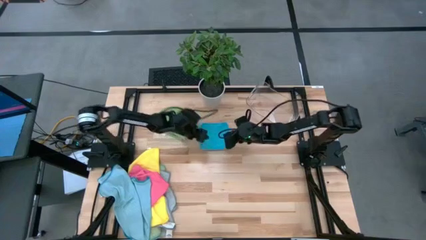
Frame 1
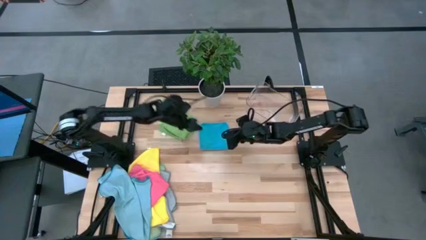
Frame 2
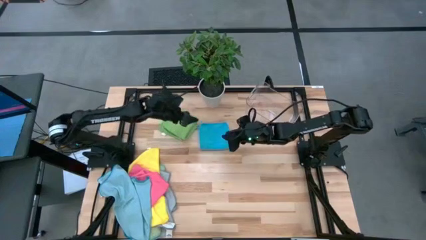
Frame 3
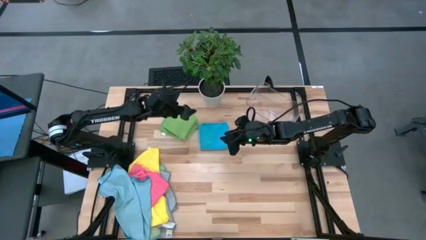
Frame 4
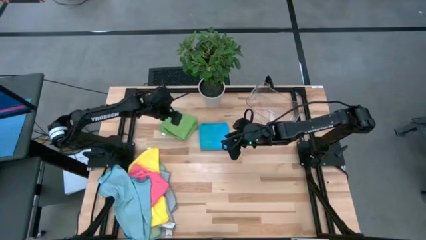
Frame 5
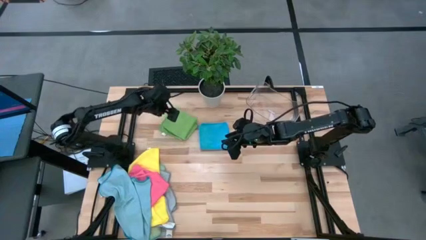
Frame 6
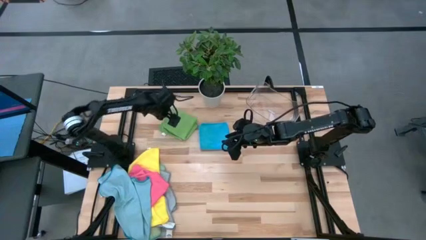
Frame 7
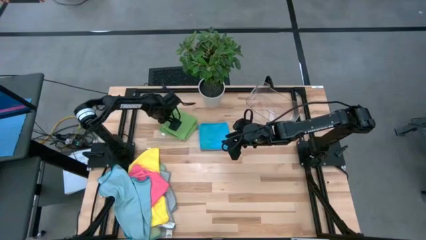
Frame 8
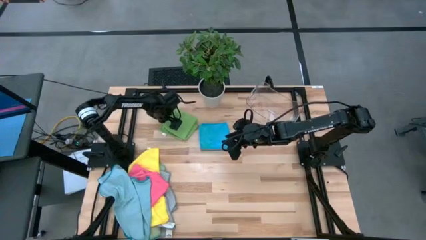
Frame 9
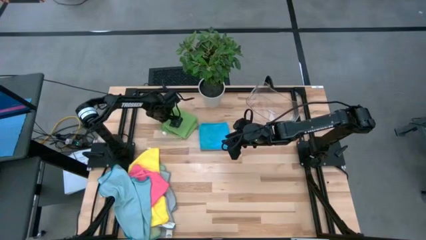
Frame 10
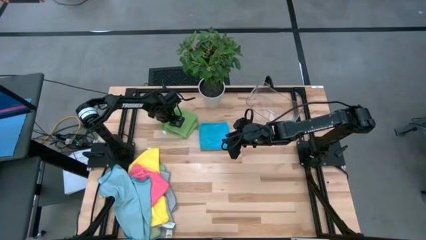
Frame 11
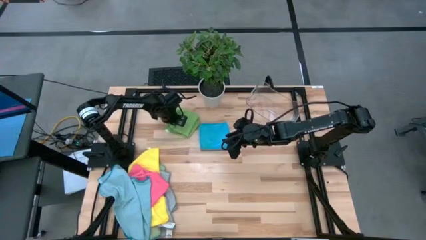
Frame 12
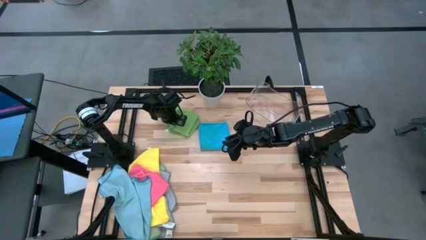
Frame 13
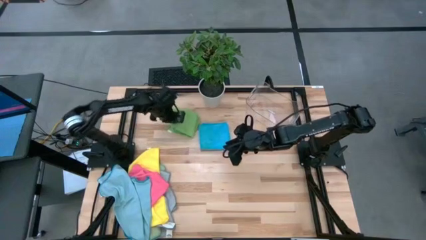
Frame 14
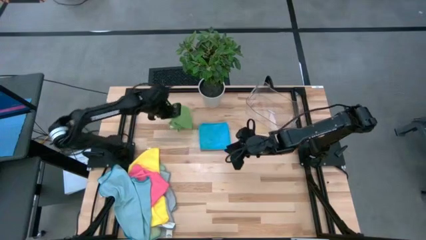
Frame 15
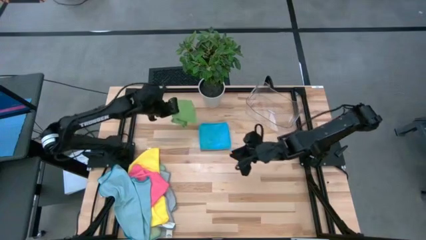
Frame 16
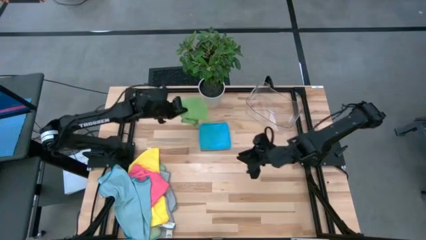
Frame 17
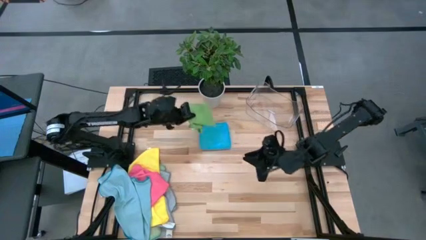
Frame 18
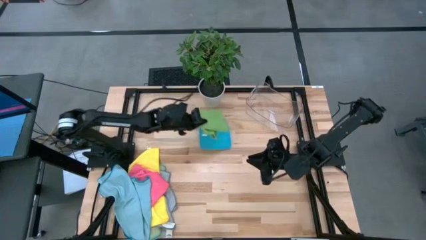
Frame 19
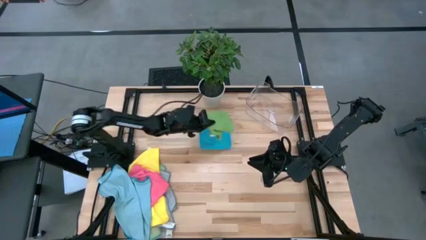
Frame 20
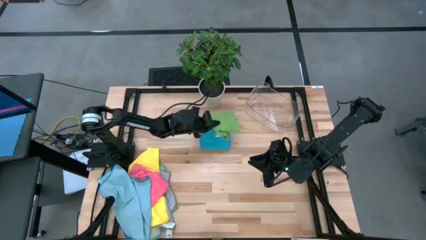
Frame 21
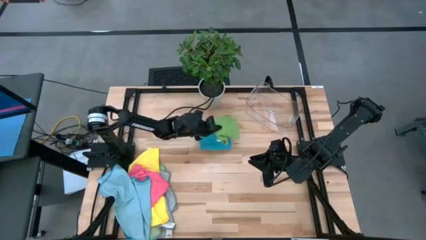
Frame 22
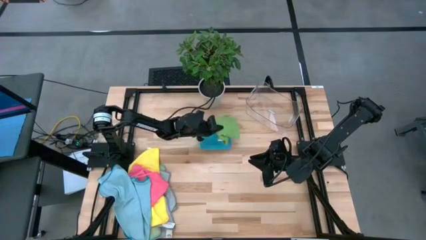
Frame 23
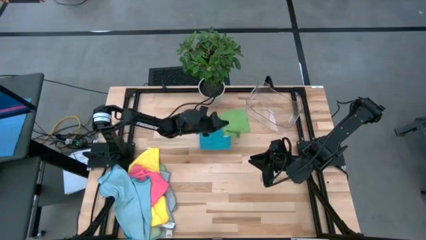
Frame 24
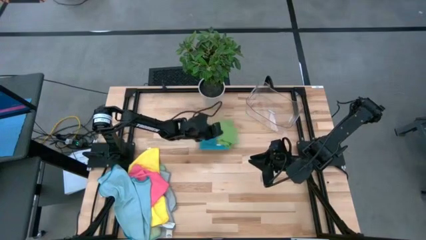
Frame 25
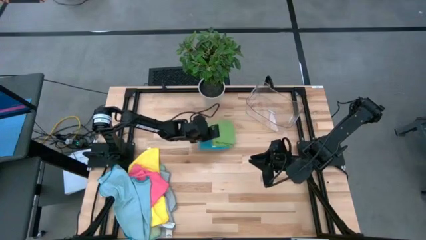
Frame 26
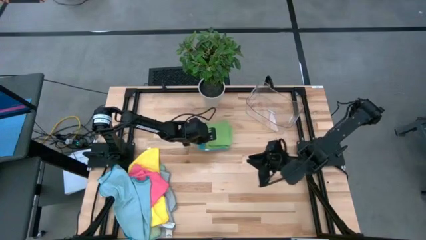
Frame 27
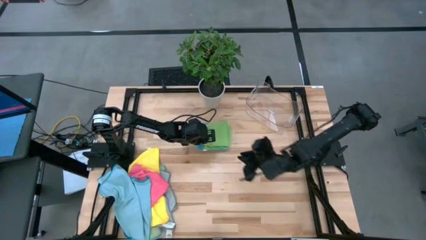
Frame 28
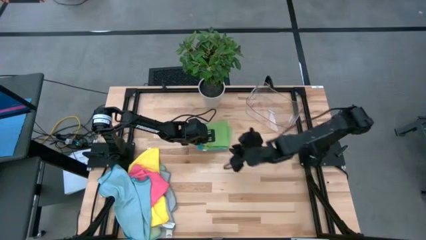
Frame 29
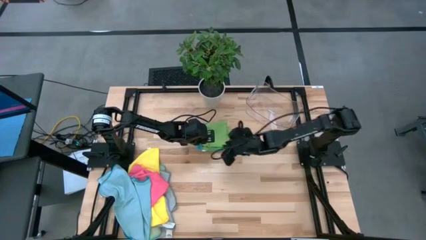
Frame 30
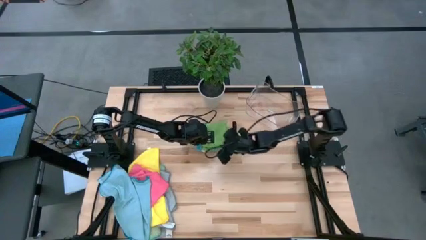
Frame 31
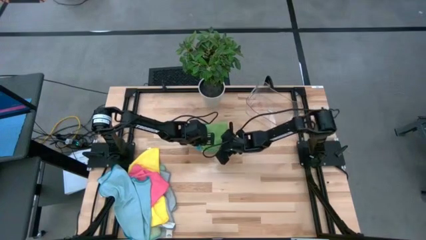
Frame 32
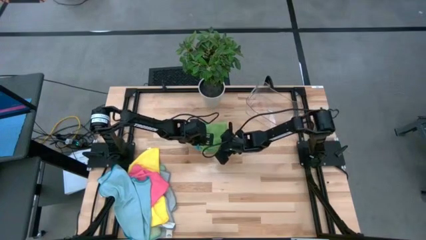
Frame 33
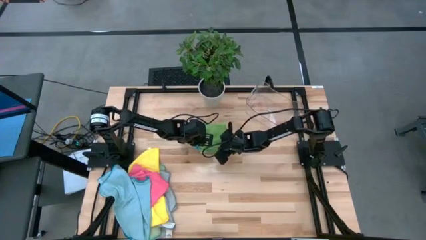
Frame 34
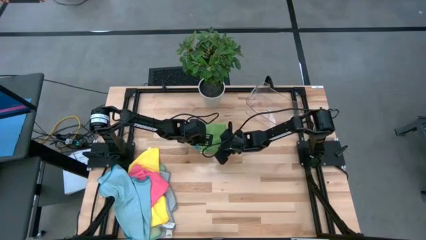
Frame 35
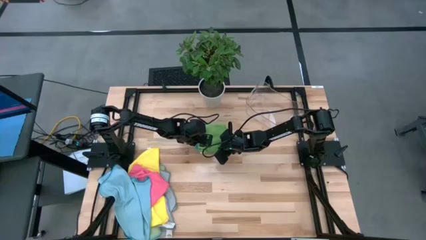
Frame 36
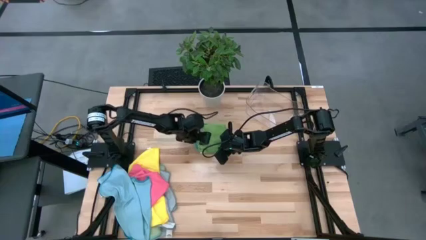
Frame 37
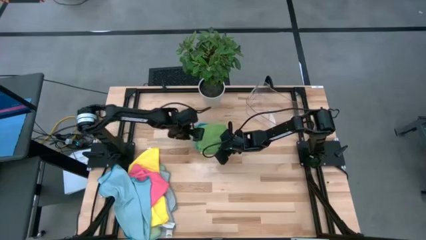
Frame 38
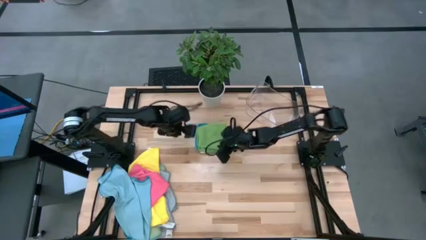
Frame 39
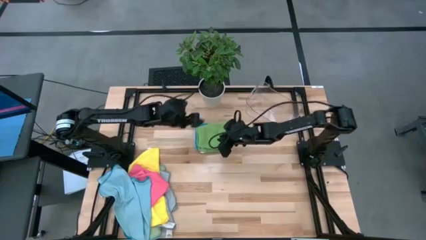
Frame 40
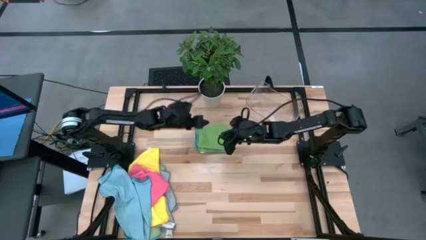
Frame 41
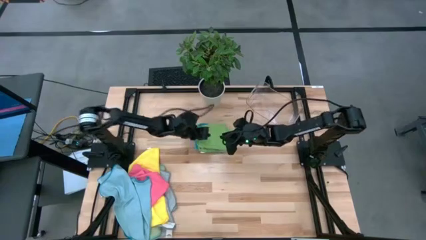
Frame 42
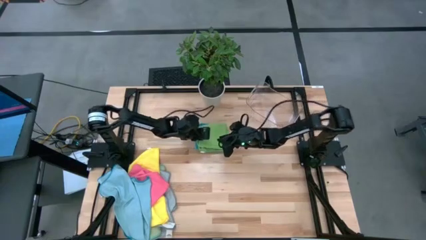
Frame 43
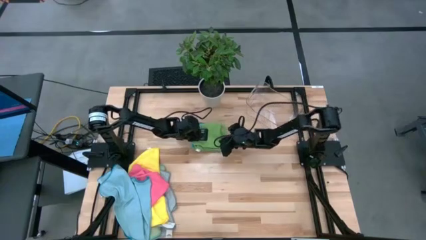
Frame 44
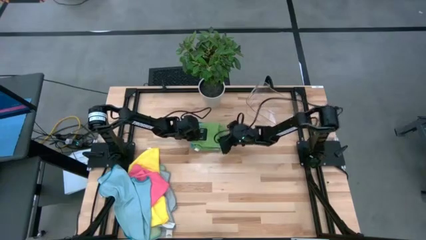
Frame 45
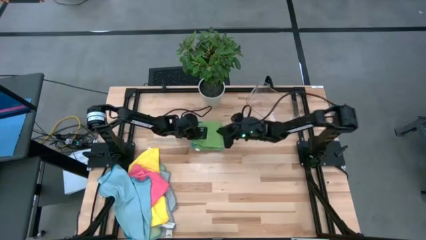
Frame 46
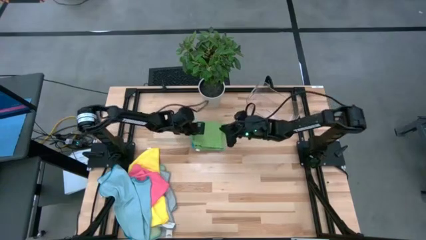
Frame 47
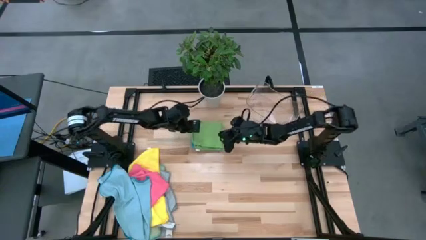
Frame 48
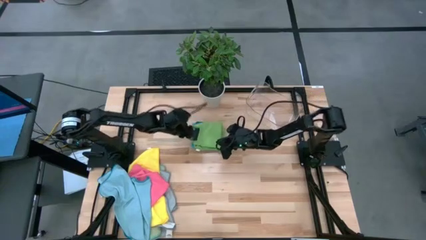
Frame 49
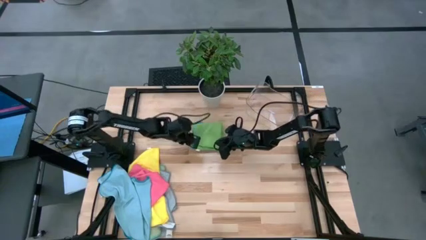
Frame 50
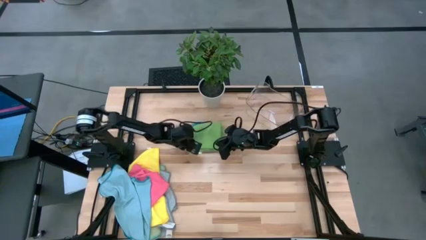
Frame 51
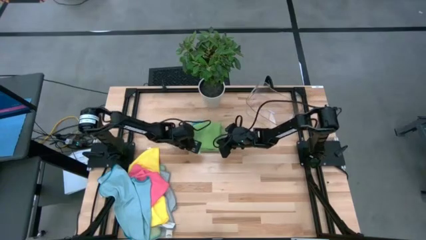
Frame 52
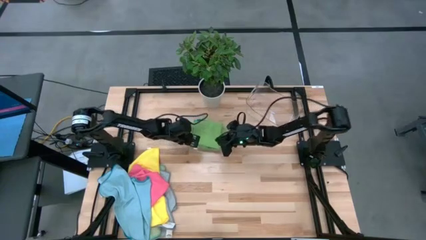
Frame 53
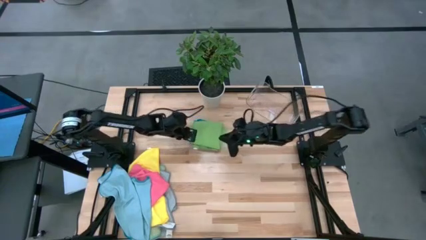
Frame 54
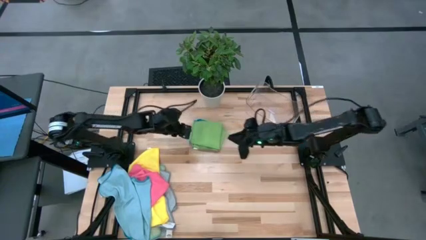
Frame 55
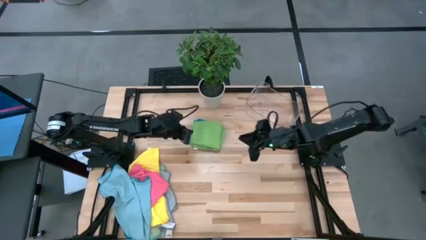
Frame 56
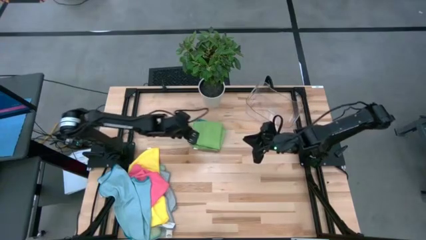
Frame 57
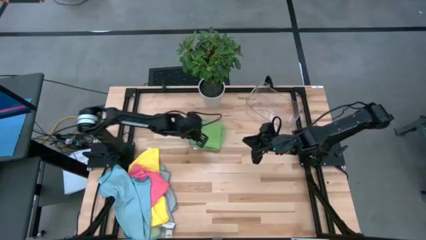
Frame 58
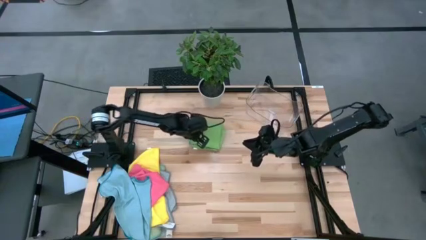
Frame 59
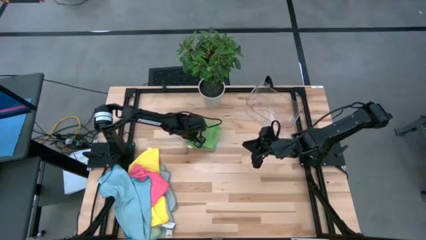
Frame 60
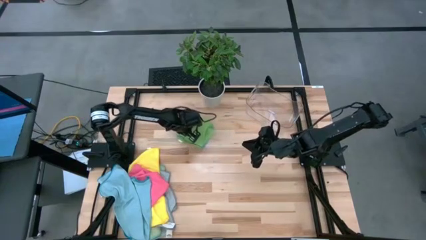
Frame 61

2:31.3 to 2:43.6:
Task: Fold microfiber towels
Stack the green microfiber towel on the blue microfiber towel

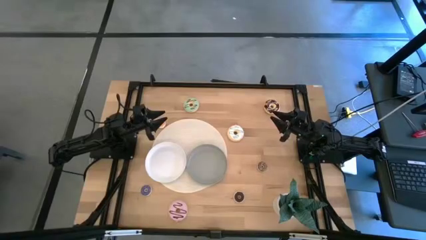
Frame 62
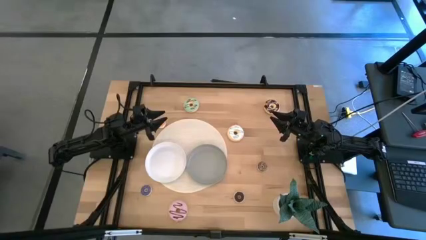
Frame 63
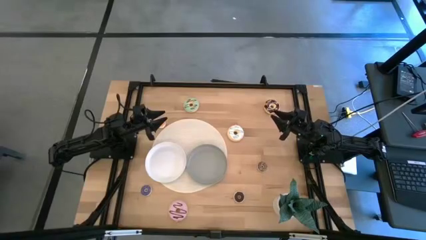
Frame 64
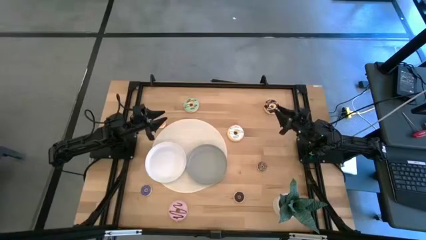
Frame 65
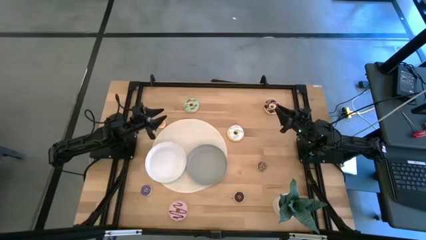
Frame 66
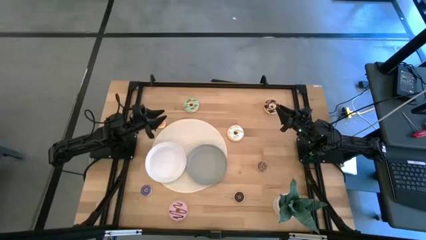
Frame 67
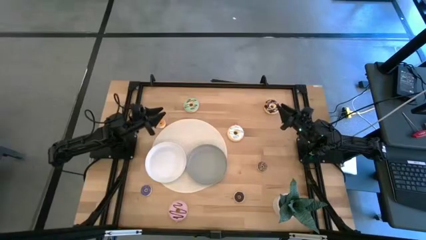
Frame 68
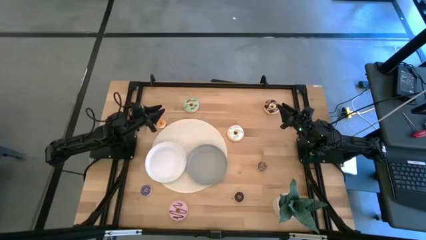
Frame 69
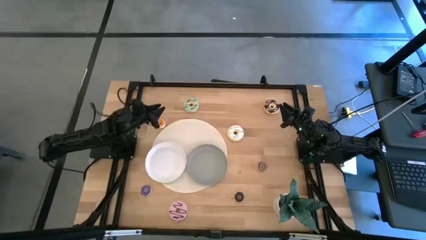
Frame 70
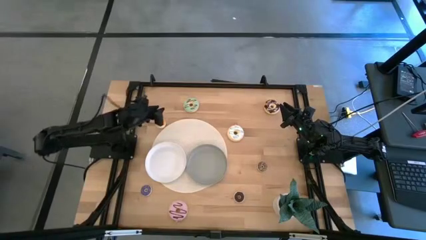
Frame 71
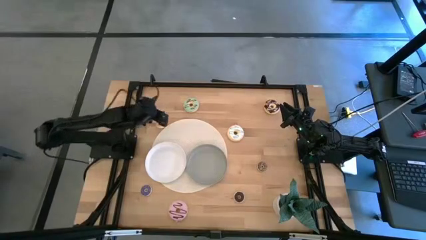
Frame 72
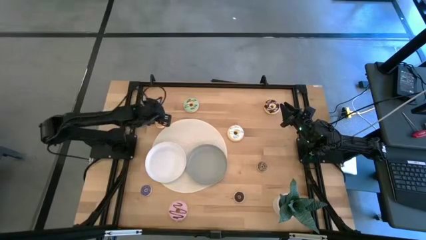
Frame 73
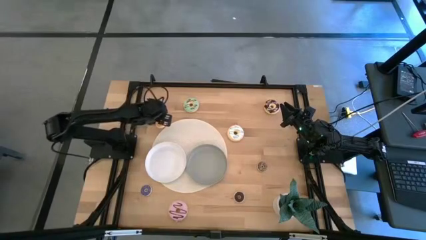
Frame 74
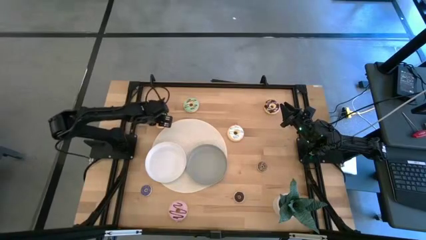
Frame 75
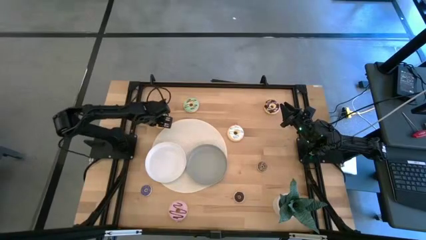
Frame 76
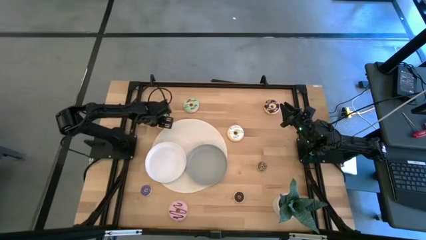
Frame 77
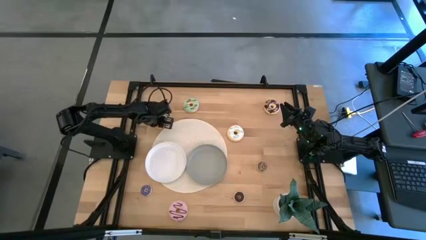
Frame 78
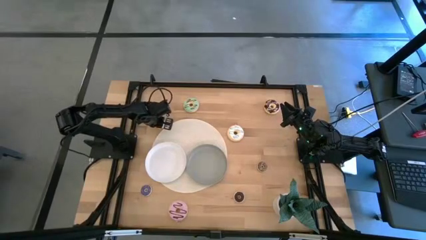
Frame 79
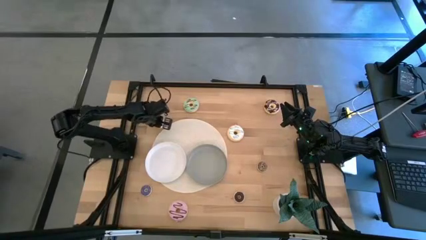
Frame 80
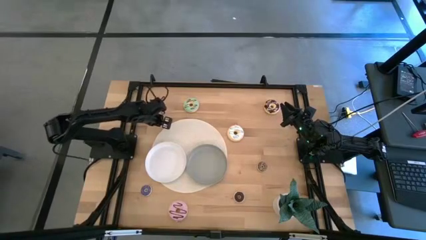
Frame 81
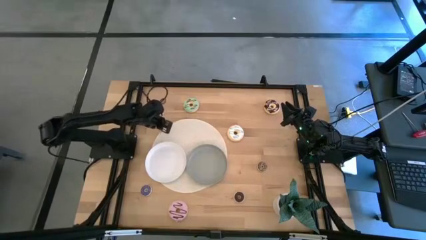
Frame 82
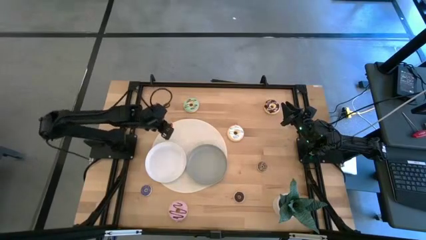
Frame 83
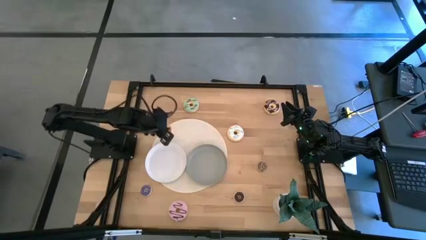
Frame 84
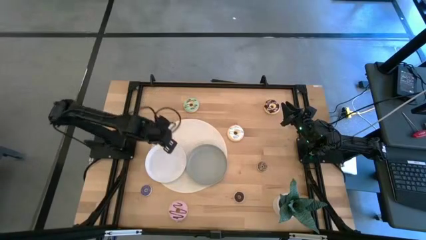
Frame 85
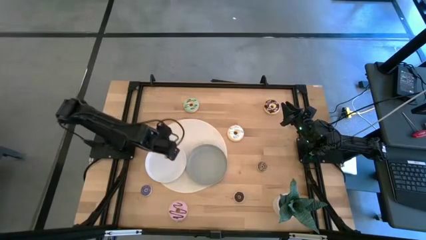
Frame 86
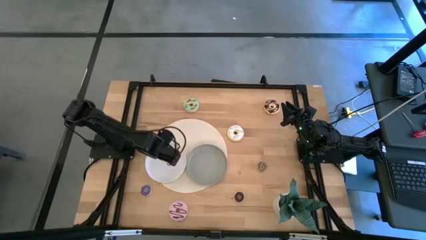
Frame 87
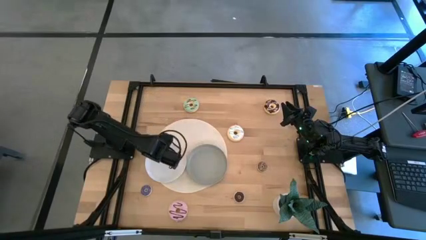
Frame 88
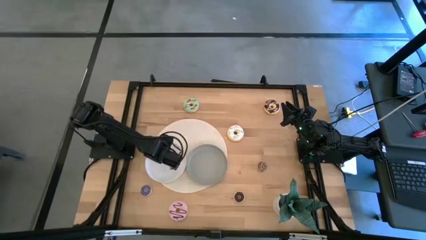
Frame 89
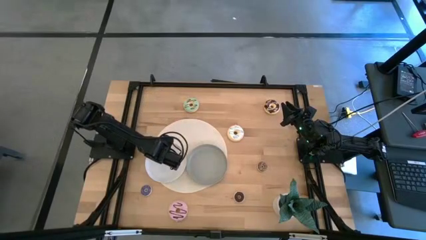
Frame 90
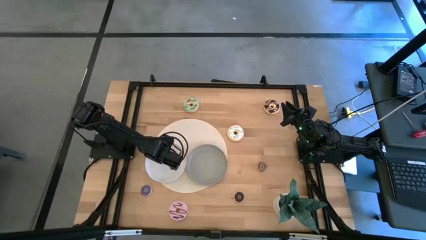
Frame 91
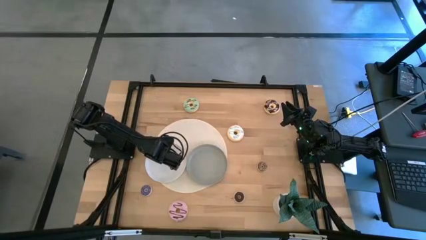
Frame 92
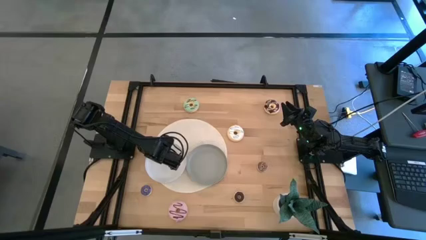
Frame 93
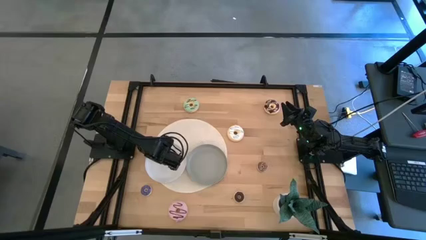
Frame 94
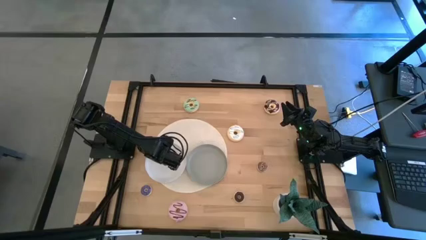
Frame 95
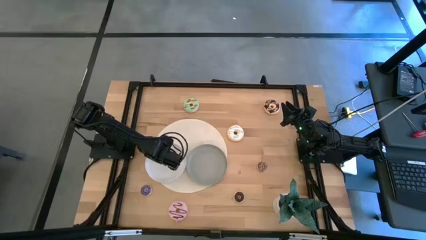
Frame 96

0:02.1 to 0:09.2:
Task: Pick & Place donuts
Put the small orange donuts on the white plate
